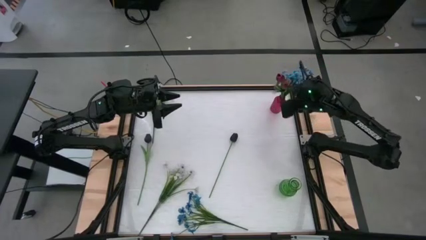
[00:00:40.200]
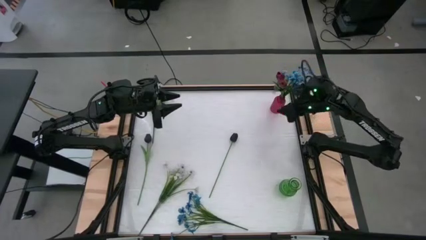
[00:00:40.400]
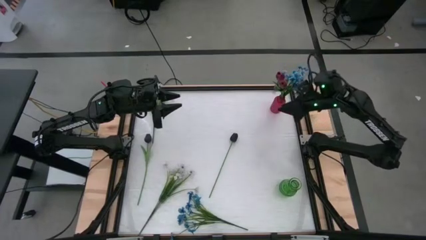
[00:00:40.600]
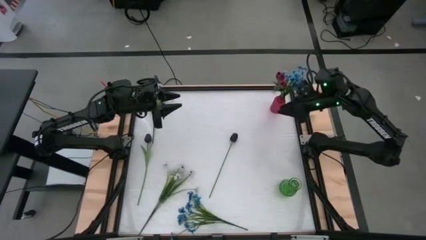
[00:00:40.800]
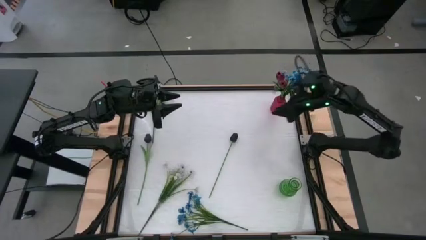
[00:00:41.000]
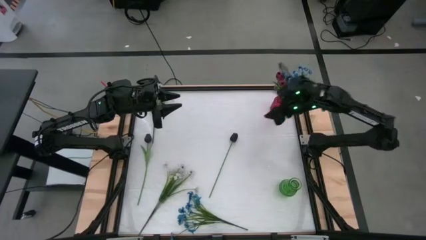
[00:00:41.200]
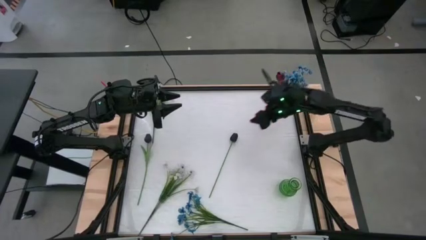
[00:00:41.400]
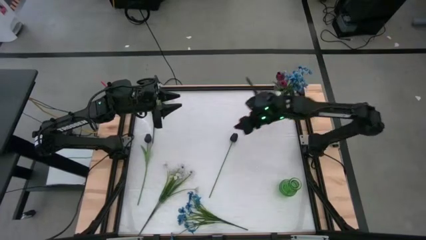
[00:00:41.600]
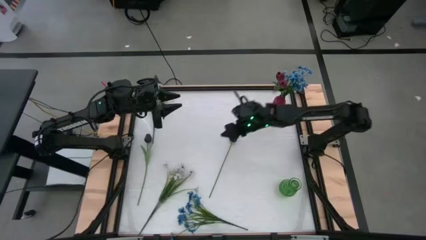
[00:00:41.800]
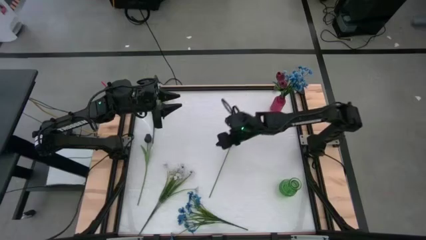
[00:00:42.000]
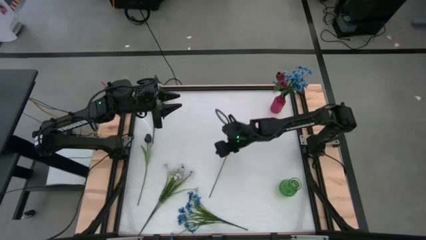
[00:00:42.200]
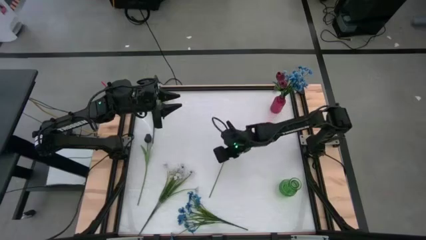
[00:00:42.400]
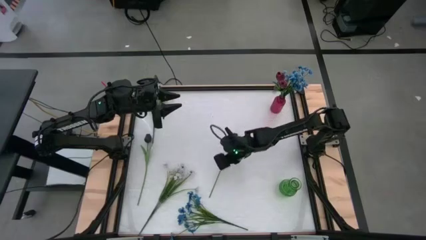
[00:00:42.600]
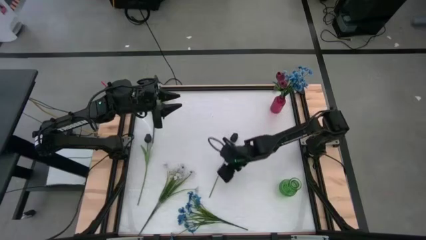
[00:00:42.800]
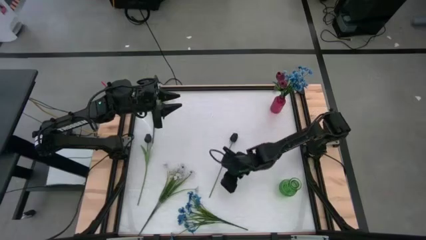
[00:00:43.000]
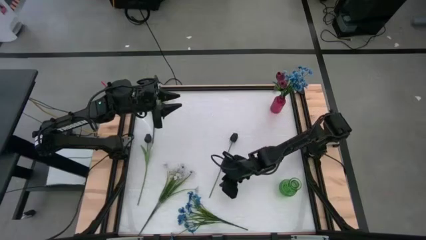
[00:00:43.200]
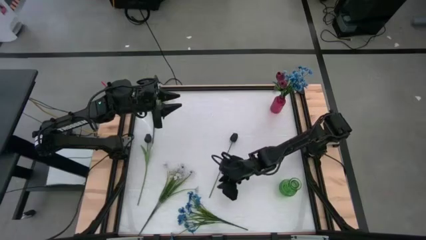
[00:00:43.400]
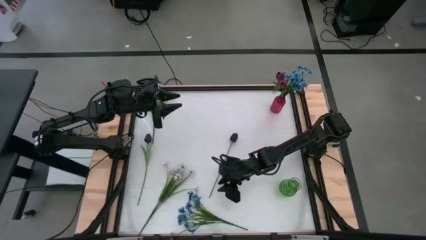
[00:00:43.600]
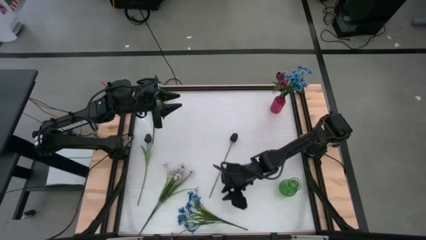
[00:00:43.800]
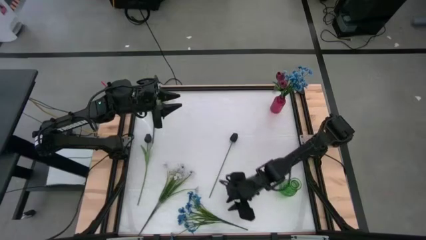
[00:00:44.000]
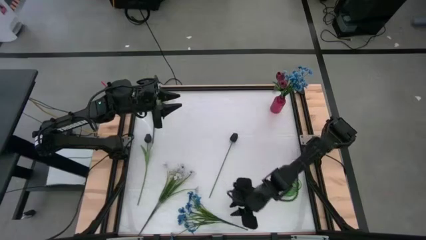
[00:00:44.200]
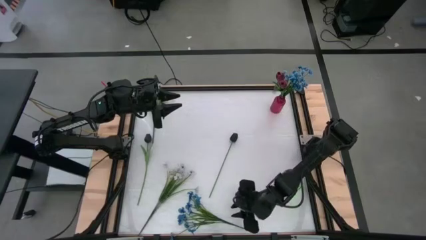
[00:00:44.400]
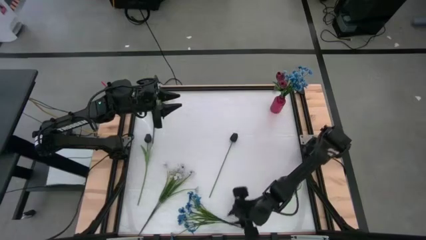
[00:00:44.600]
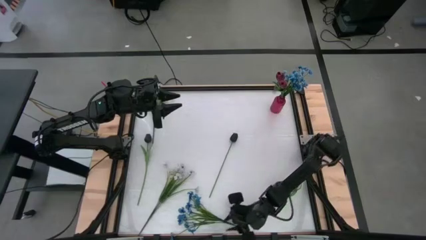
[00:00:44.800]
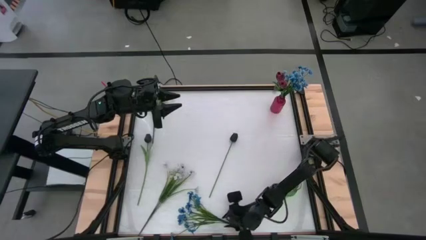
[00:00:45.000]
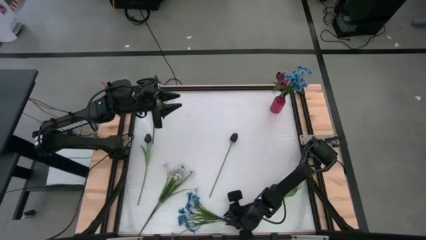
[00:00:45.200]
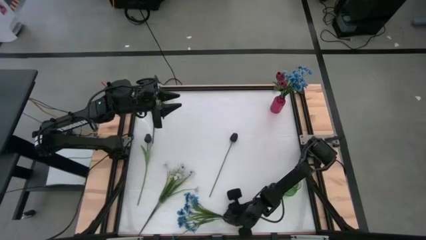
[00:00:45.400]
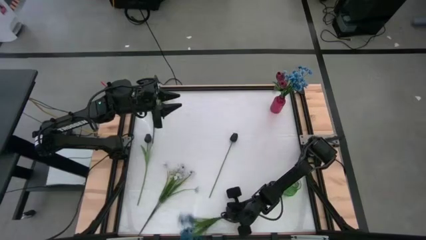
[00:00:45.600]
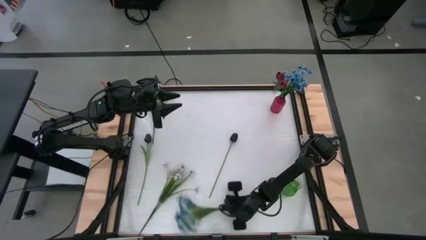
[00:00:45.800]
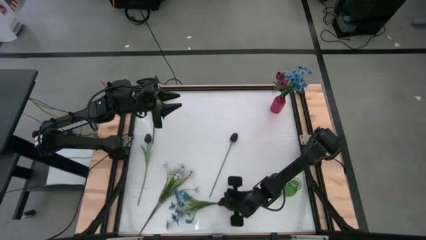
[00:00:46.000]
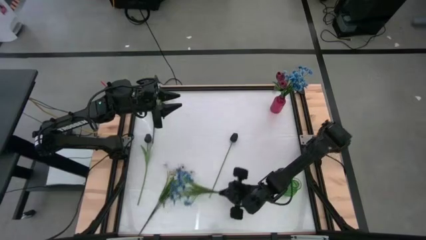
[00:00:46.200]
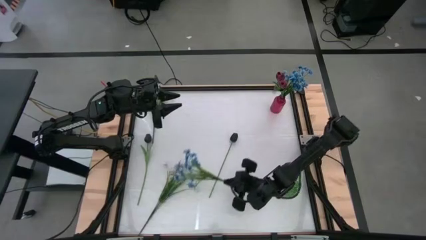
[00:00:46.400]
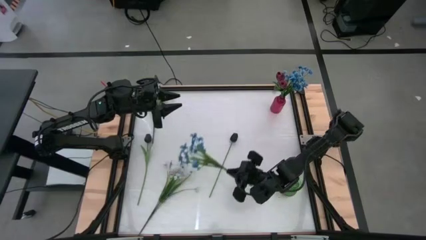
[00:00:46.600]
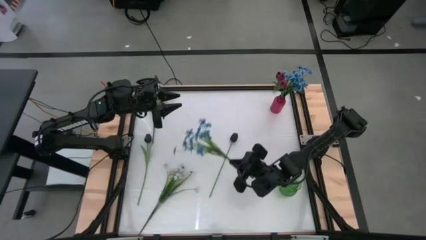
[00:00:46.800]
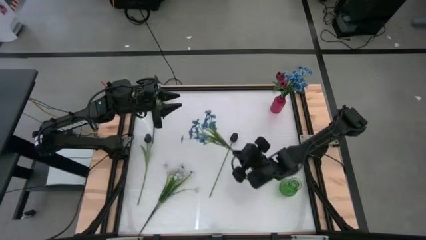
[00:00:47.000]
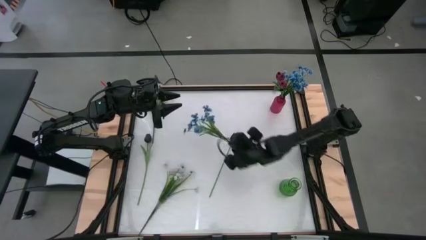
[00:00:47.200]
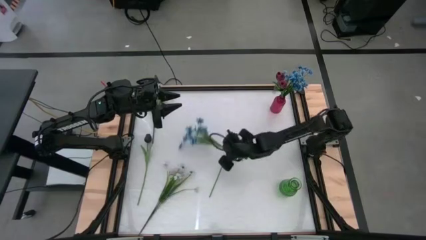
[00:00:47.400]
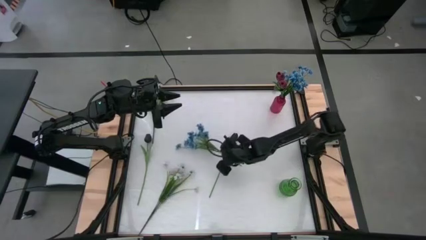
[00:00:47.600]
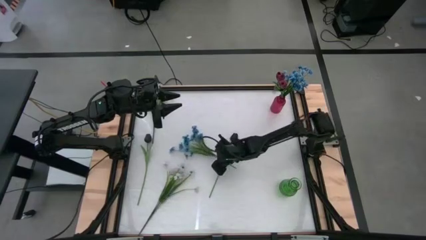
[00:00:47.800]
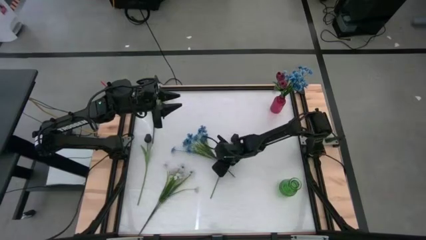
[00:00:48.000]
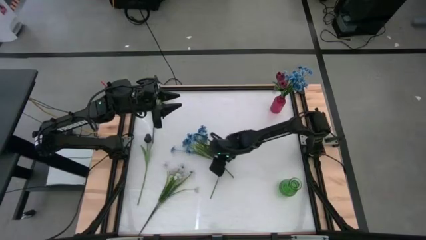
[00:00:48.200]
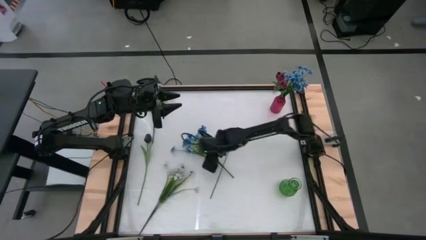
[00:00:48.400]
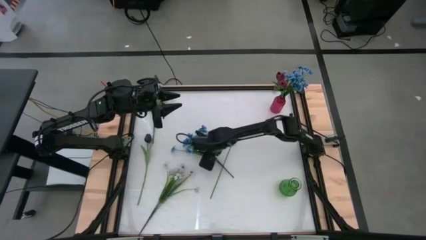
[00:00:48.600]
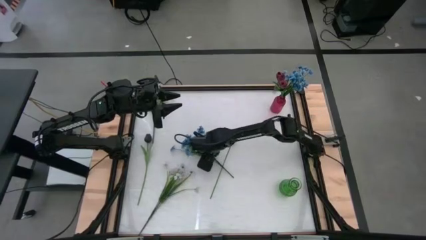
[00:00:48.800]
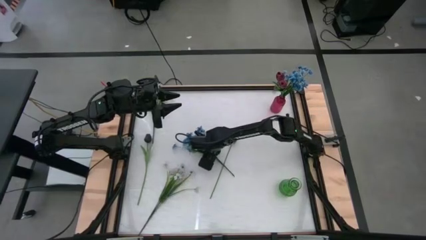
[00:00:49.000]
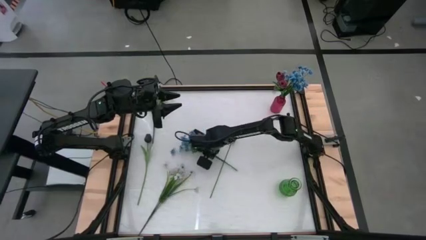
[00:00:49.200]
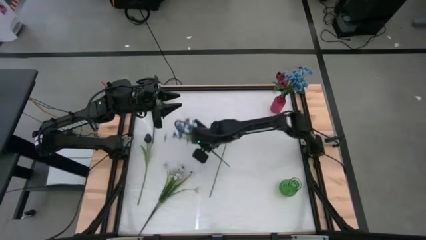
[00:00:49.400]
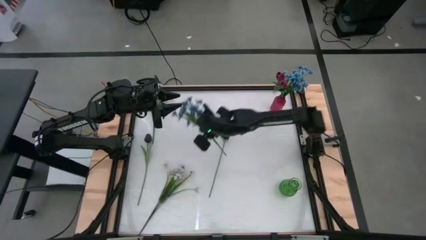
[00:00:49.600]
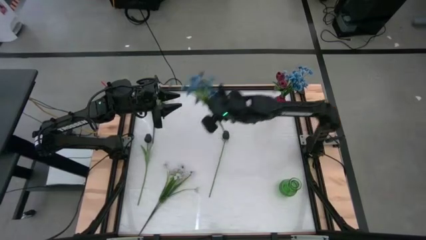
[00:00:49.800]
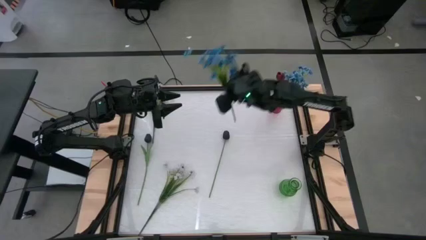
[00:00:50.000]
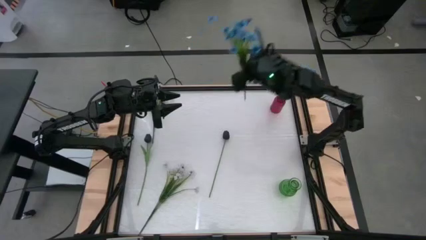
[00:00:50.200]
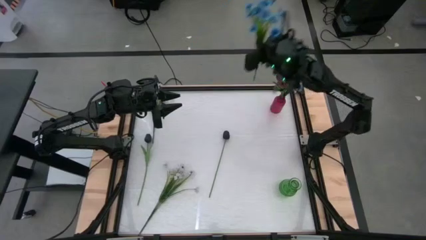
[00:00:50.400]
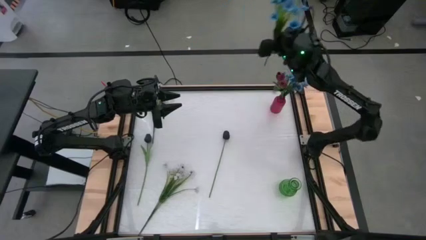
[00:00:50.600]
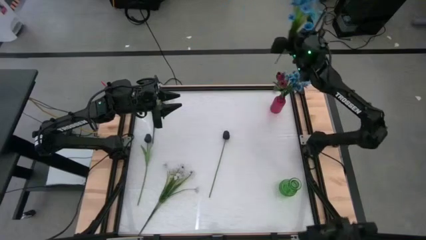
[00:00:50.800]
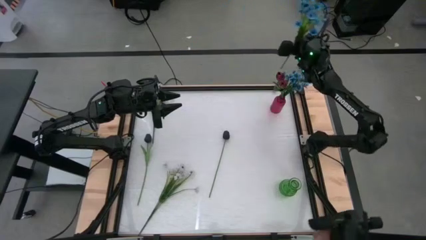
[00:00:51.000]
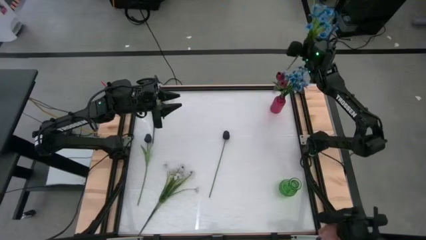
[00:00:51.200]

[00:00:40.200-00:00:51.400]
Task: Sort flowers into vase by color
Put the blue flowers into the red vase

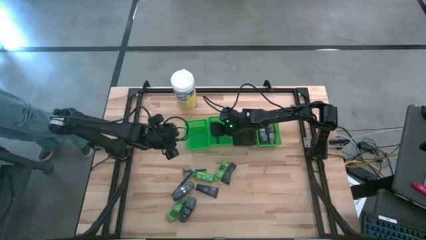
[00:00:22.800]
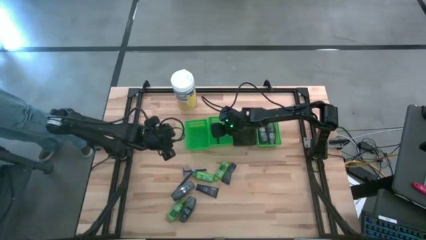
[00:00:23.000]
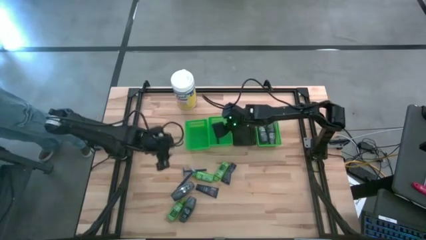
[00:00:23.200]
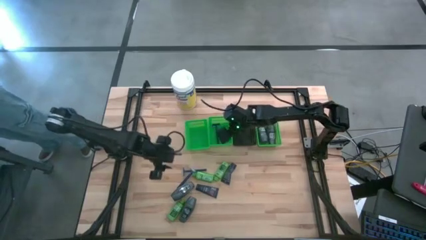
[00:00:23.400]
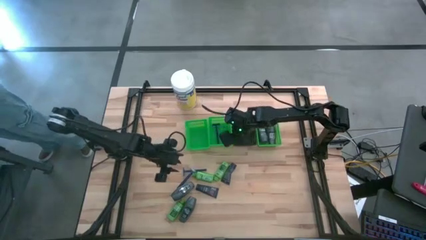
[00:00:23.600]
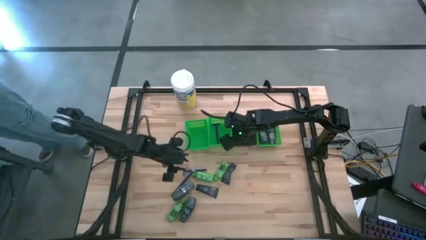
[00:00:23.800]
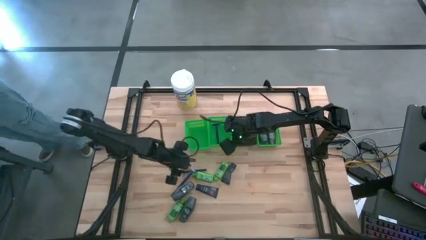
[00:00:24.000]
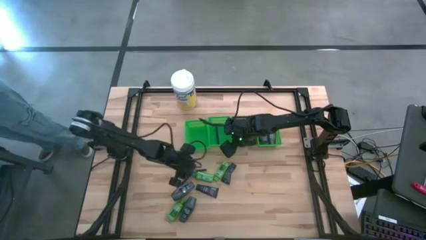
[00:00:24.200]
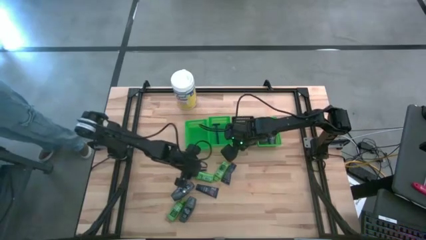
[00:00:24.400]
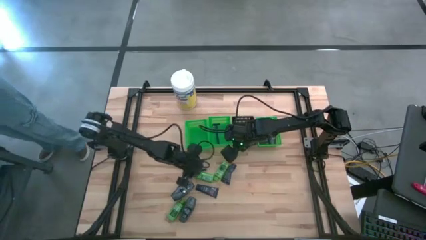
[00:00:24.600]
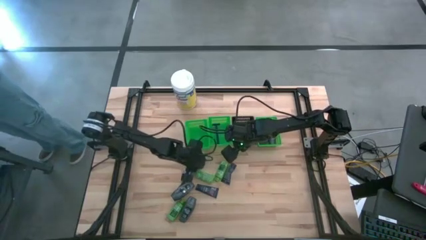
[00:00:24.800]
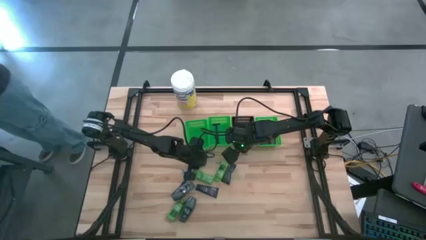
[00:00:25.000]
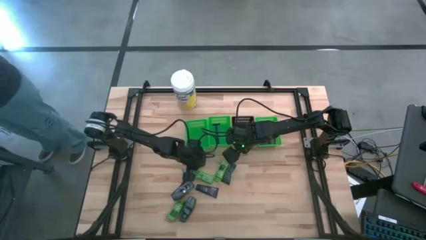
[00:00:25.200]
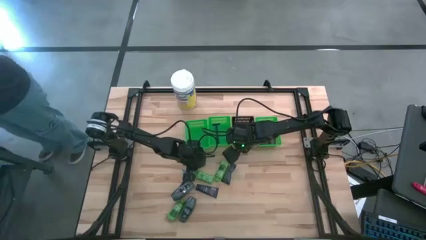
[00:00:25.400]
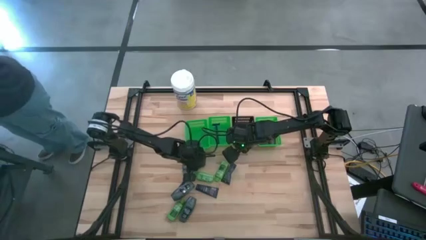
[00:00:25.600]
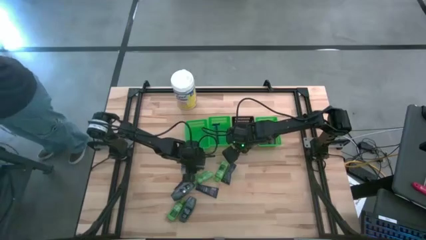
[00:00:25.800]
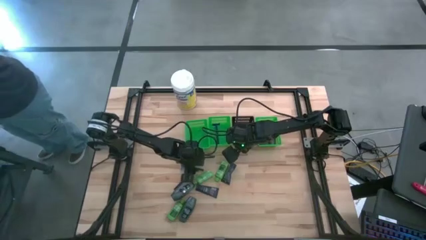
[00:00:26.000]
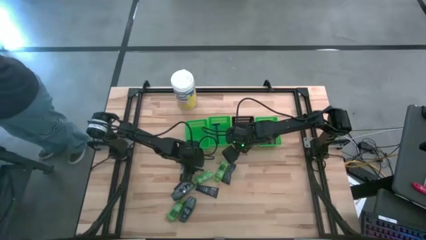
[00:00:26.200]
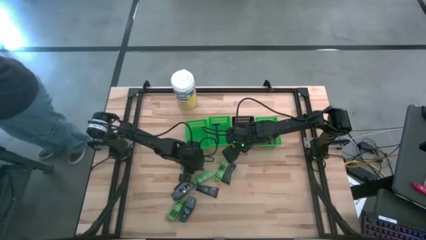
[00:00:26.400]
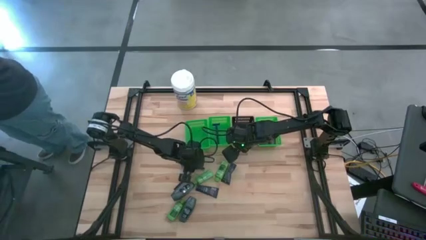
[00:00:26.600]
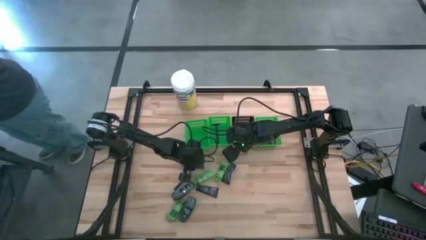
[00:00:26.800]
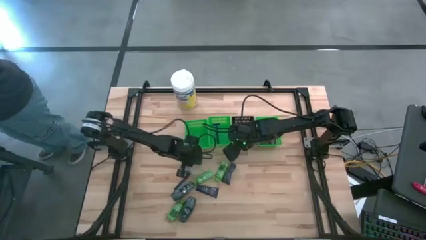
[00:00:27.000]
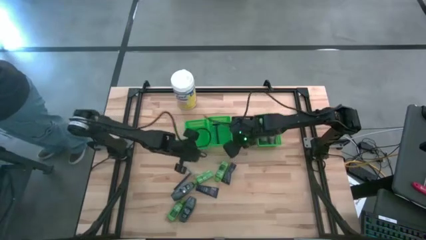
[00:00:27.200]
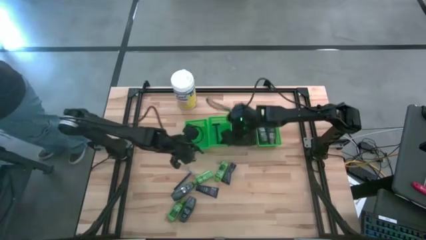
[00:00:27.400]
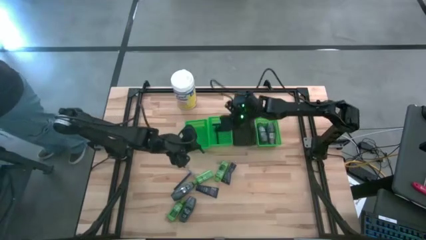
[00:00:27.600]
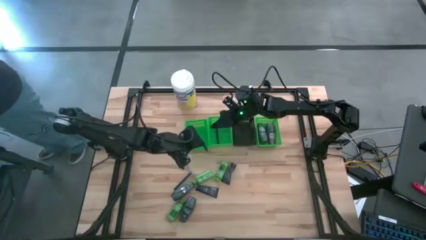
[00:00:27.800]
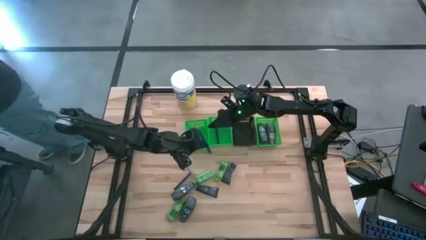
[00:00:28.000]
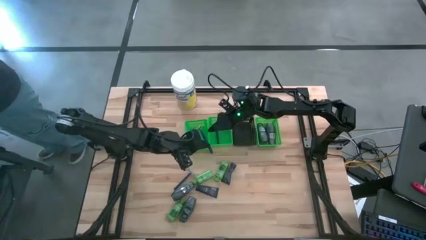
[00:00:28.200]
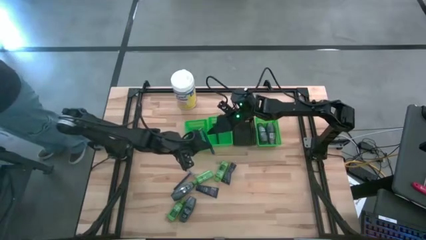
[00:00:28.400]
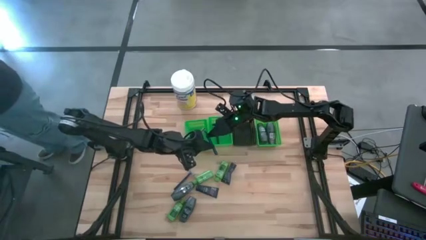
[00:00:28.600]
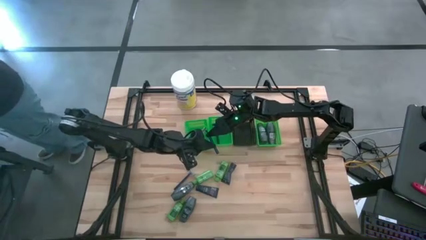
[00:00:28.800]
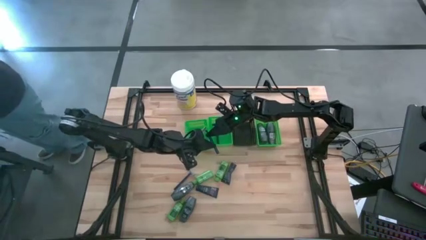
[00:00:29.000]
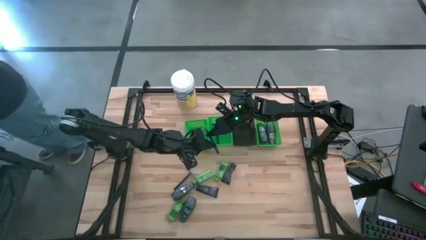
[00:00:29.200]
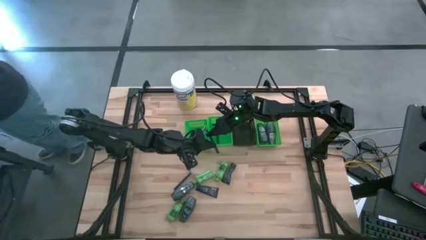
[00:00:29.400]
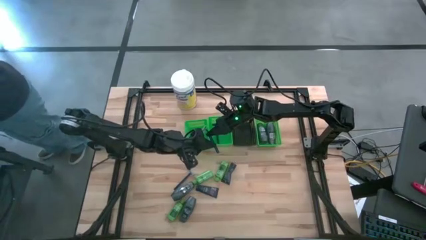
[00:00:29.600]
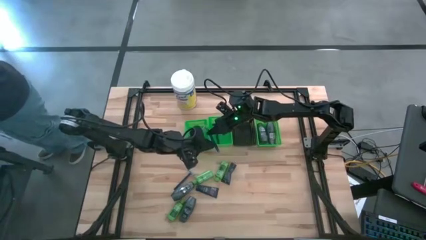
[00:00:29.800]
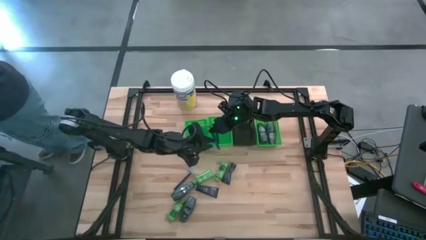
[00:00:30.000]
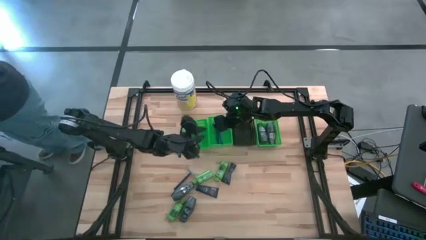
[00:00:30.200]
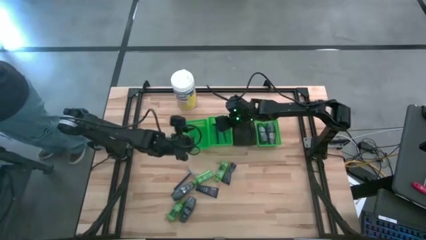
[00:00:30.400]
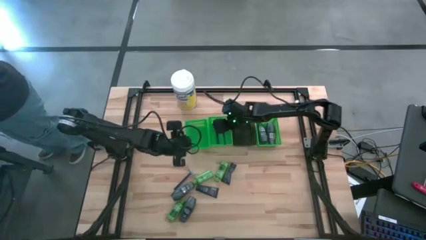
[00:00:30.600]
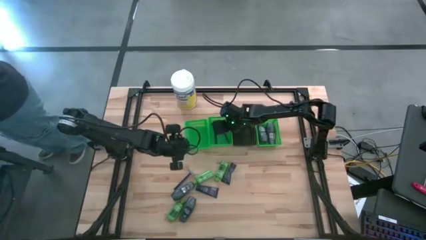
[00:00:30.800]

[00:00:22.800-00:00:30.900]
Task: Pick & Place Travel size toiletries
Put the top razor into the middle green bin
